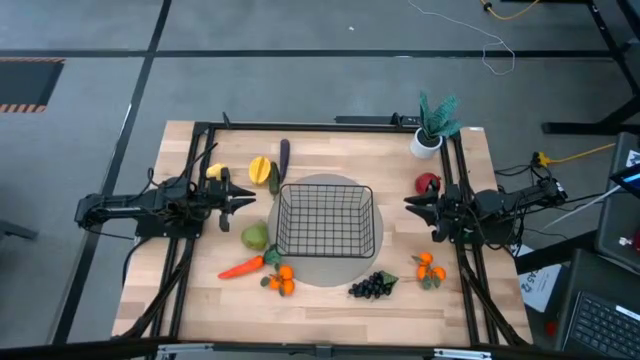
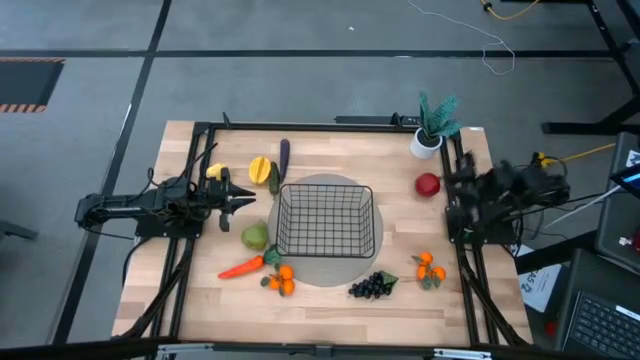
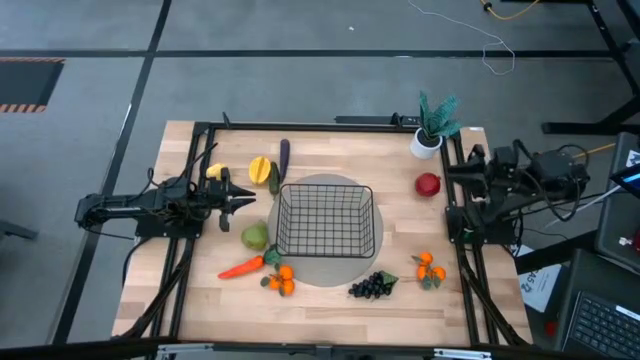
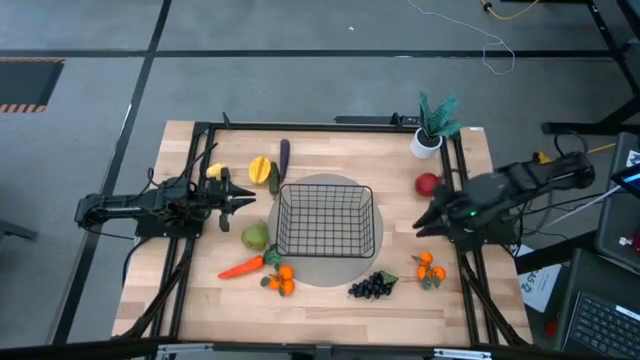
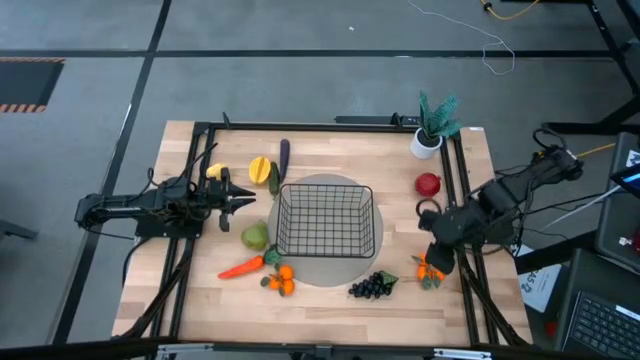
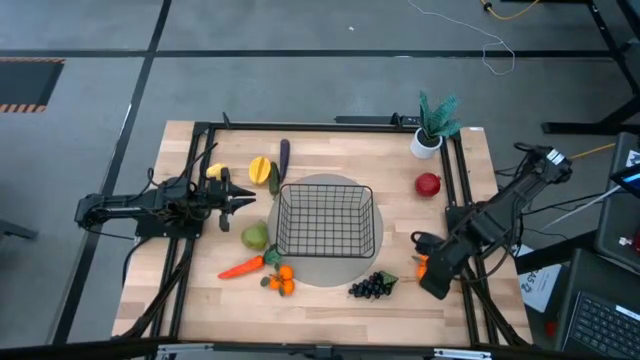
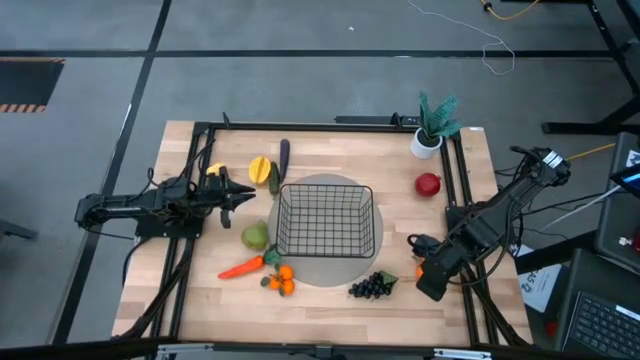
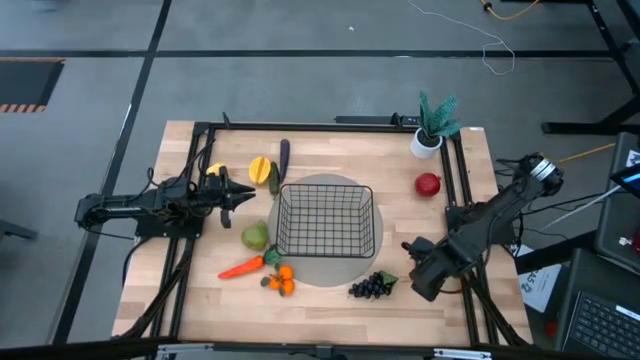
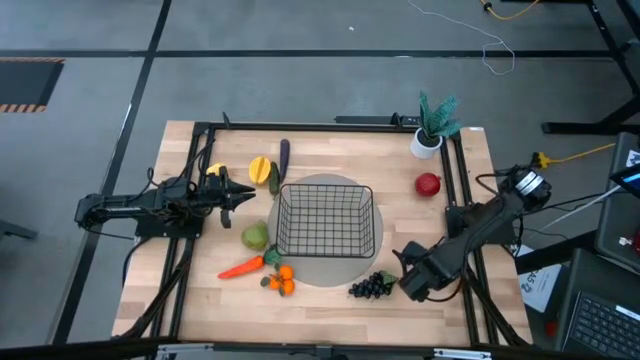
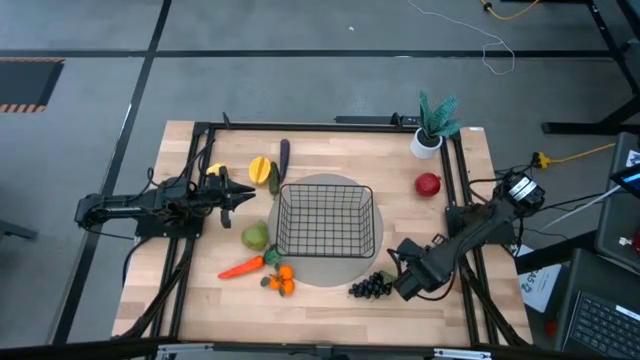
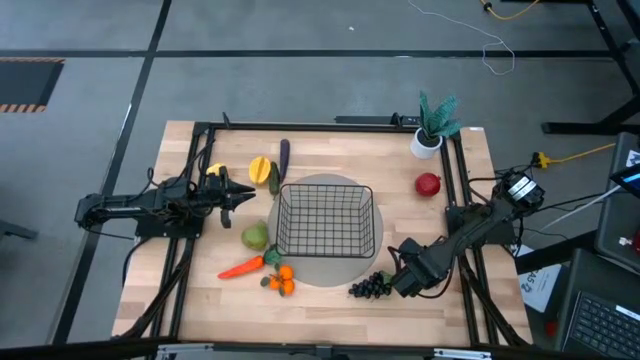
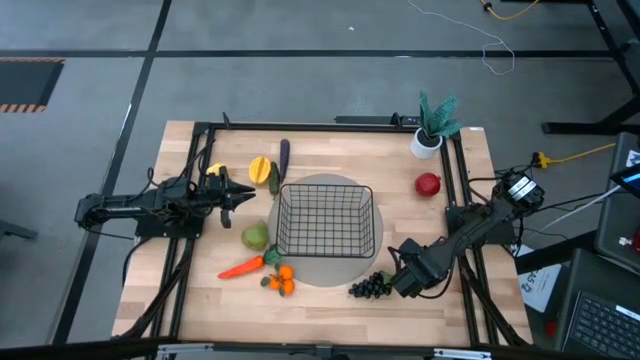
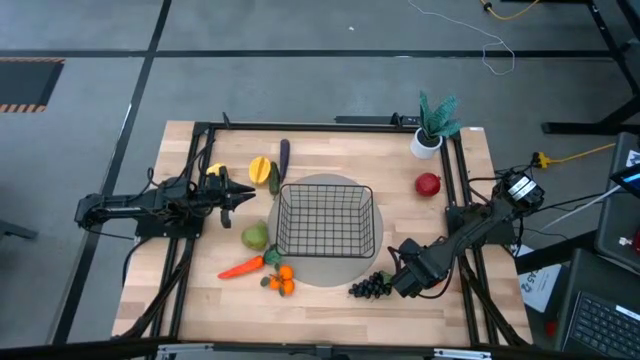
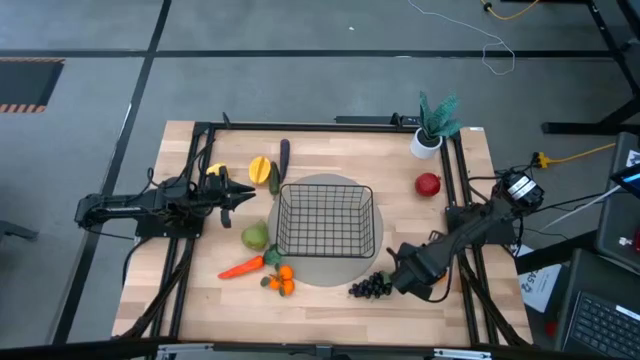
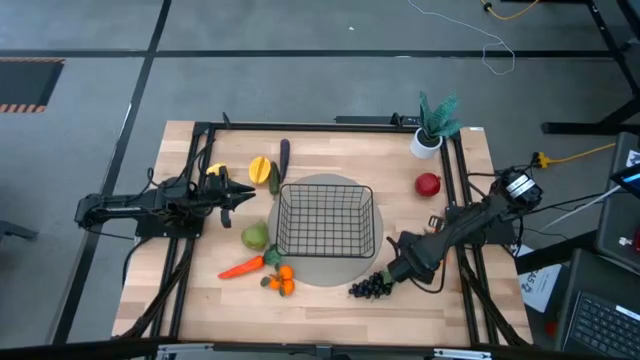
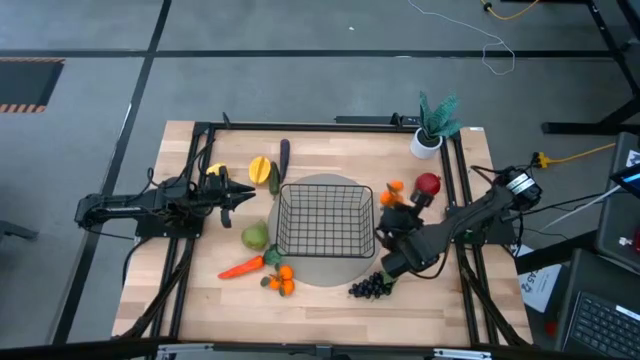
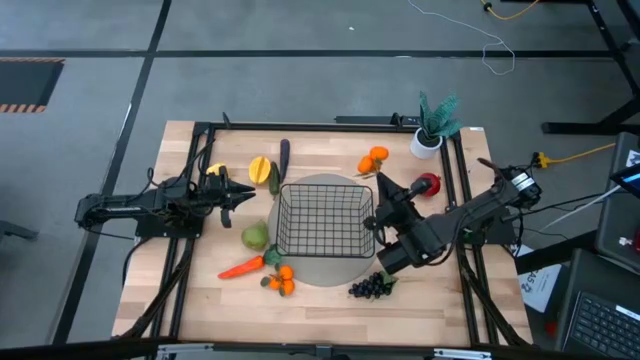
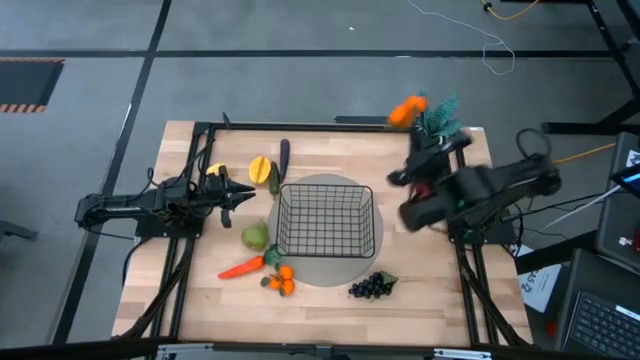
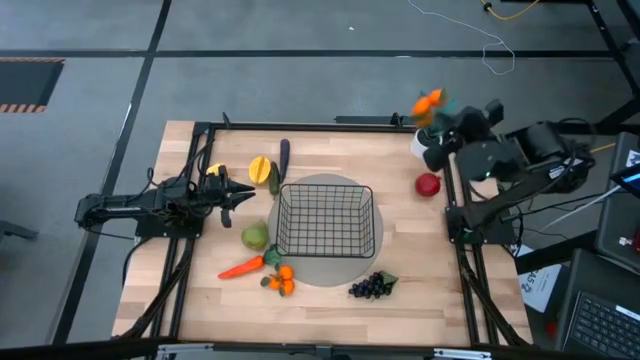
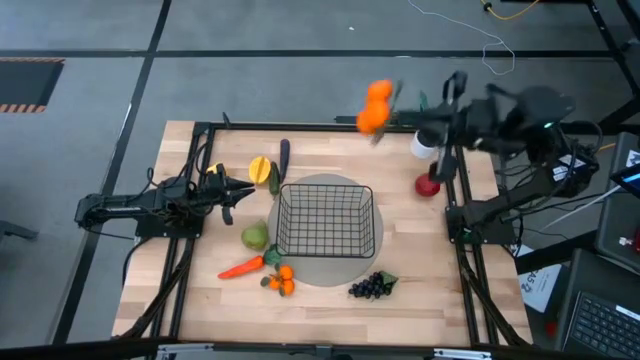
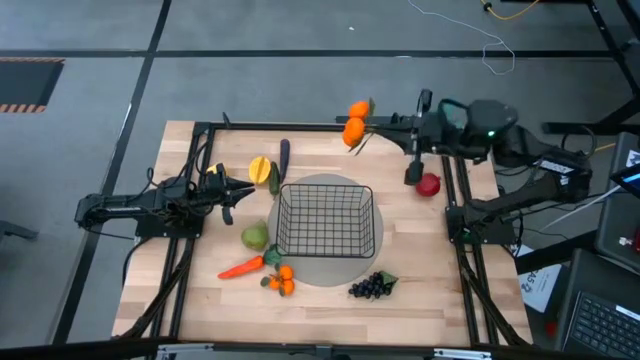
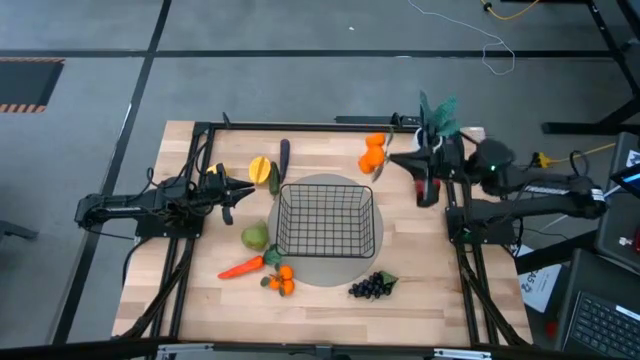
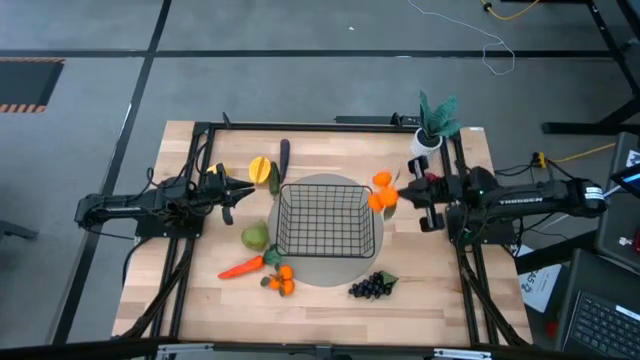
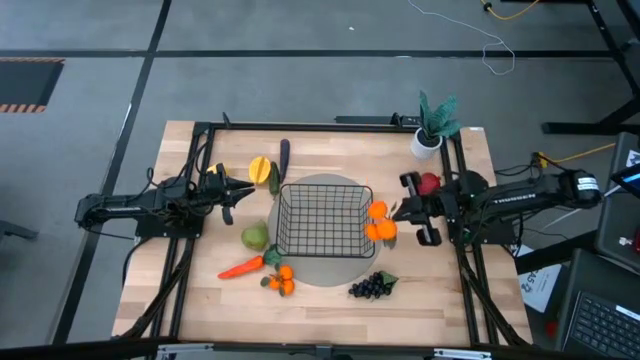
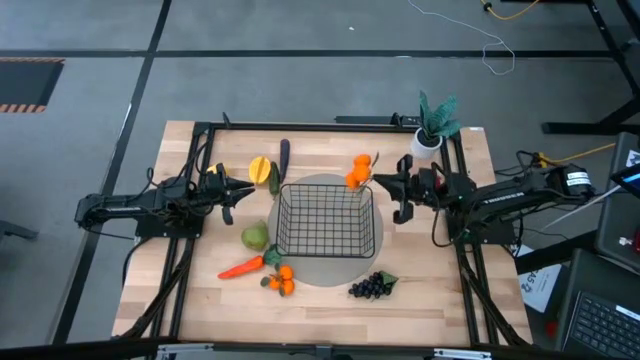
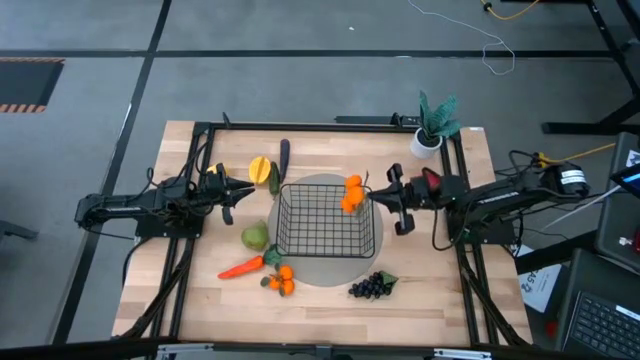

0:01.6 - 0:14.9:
Task: Build produce basket
Put the right tangerines into the black wire basket
